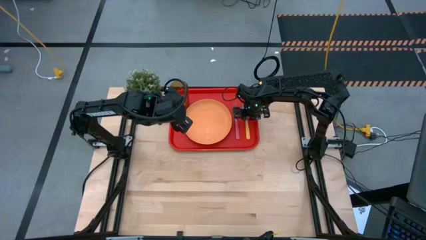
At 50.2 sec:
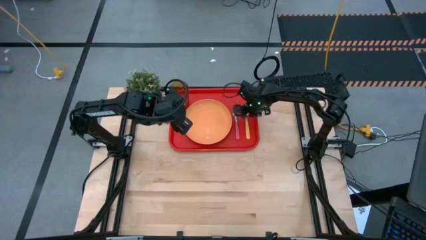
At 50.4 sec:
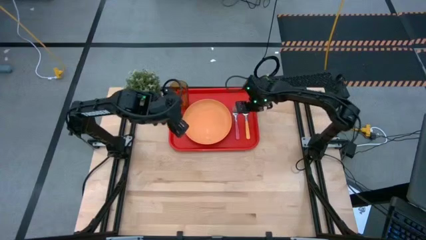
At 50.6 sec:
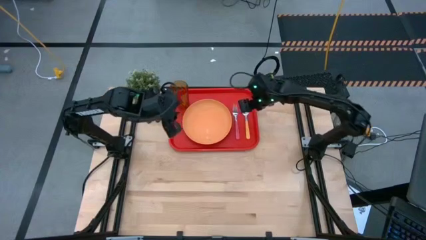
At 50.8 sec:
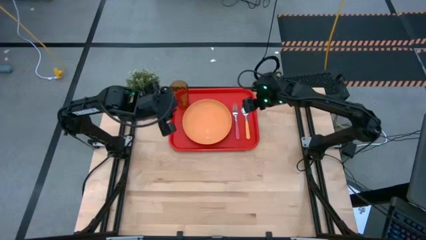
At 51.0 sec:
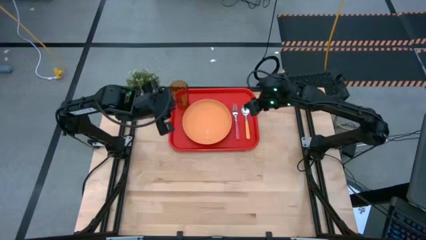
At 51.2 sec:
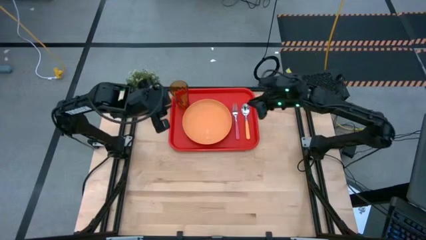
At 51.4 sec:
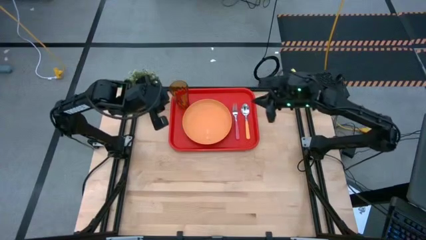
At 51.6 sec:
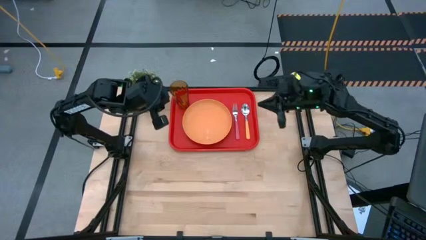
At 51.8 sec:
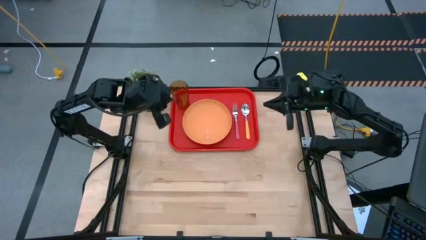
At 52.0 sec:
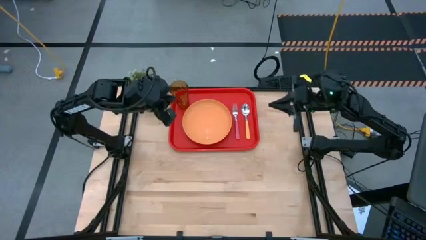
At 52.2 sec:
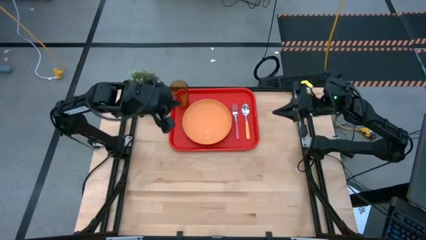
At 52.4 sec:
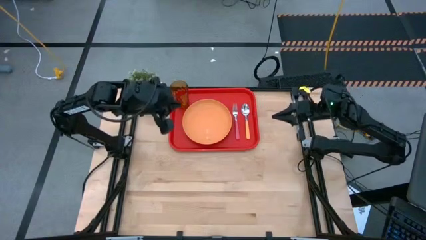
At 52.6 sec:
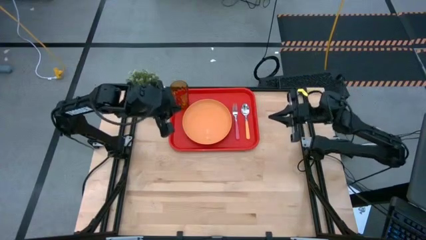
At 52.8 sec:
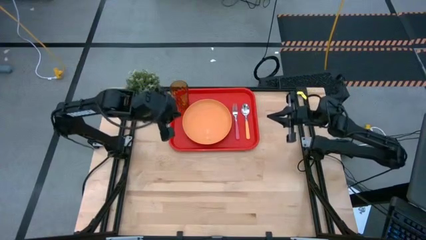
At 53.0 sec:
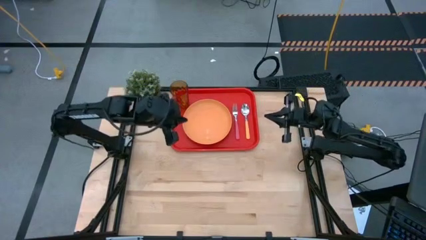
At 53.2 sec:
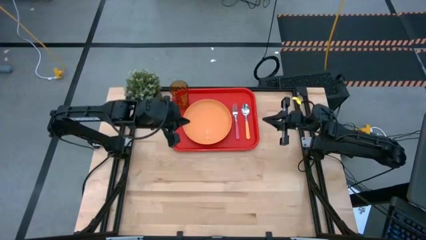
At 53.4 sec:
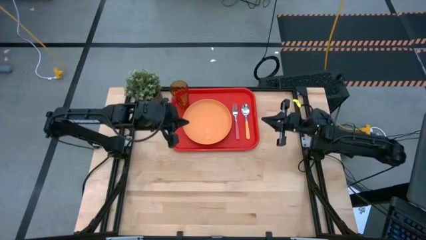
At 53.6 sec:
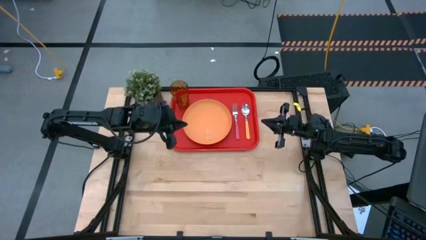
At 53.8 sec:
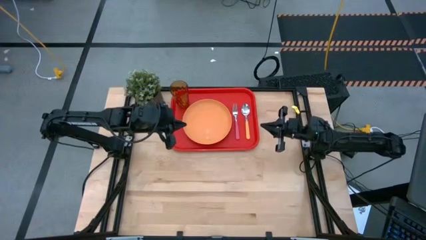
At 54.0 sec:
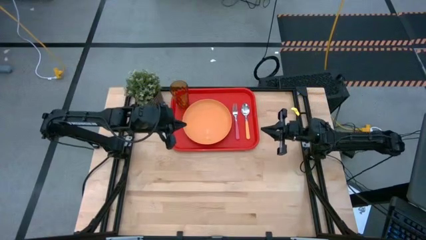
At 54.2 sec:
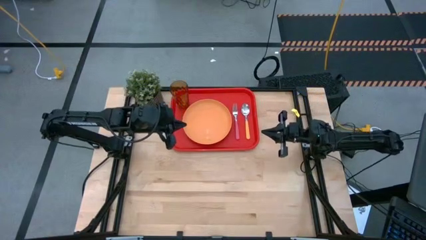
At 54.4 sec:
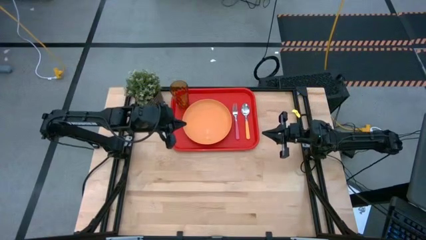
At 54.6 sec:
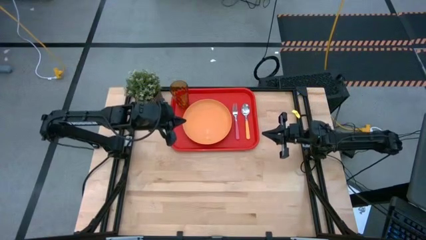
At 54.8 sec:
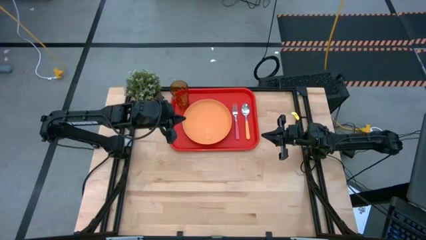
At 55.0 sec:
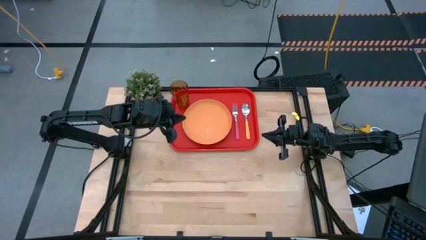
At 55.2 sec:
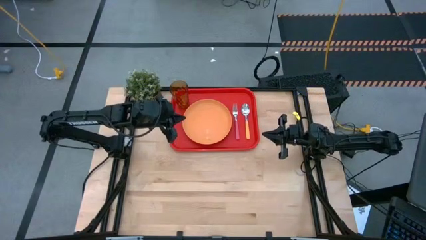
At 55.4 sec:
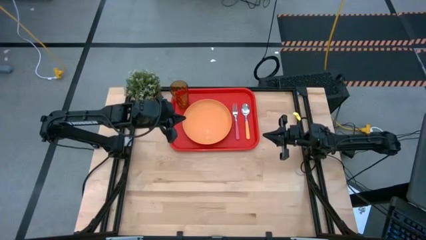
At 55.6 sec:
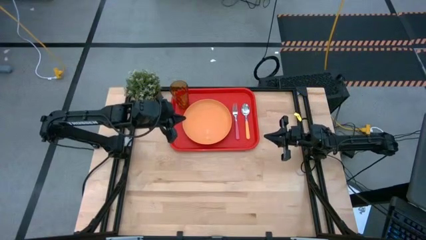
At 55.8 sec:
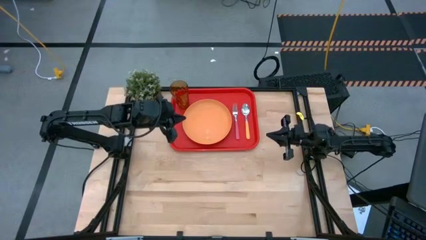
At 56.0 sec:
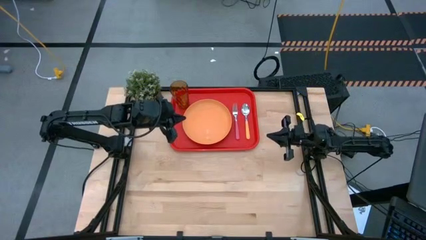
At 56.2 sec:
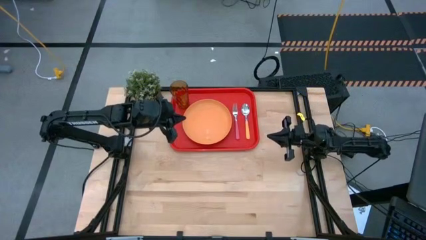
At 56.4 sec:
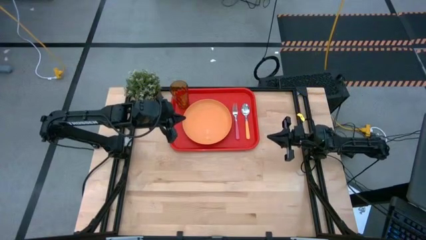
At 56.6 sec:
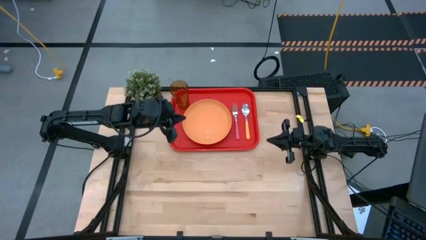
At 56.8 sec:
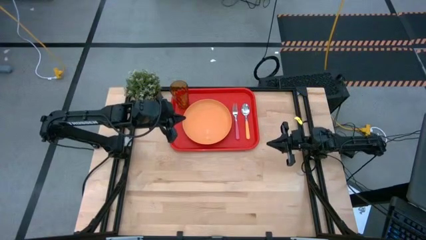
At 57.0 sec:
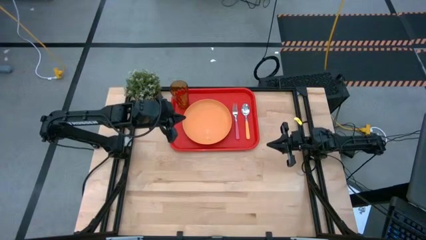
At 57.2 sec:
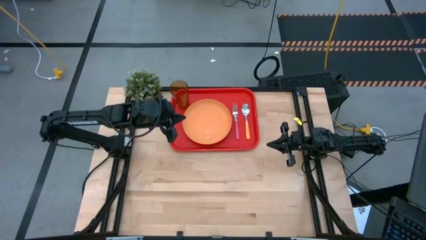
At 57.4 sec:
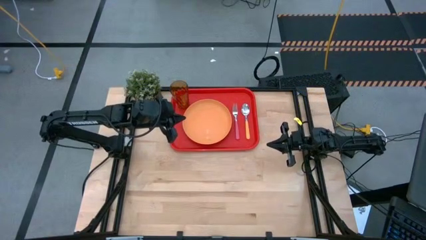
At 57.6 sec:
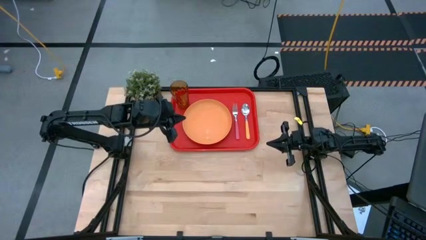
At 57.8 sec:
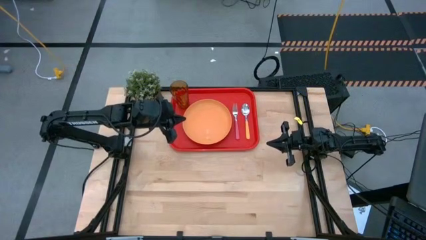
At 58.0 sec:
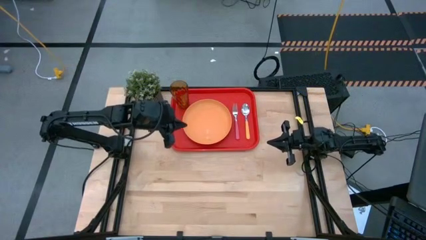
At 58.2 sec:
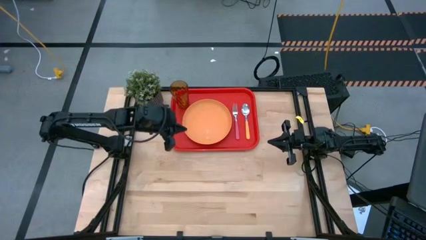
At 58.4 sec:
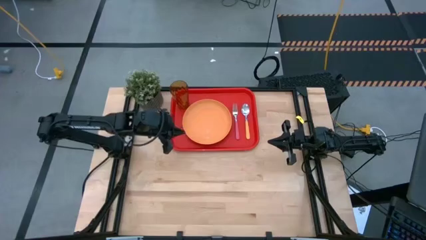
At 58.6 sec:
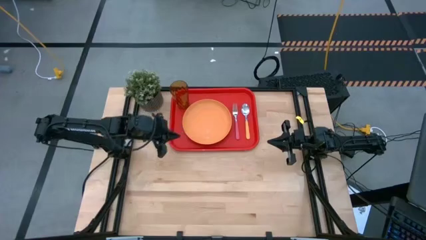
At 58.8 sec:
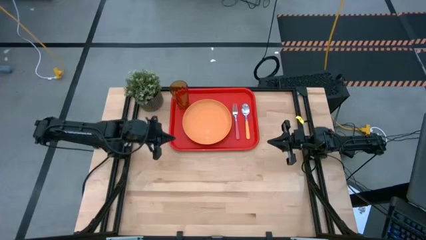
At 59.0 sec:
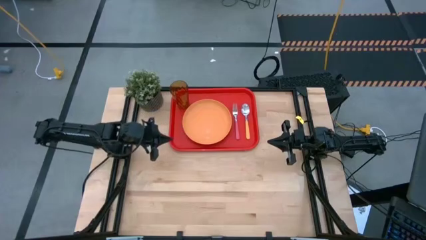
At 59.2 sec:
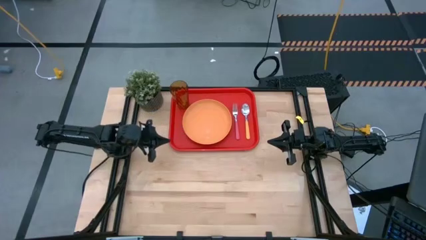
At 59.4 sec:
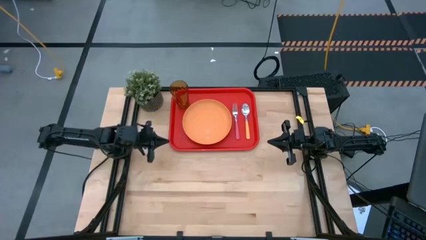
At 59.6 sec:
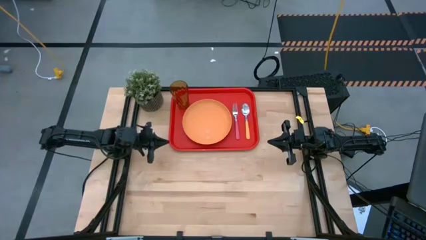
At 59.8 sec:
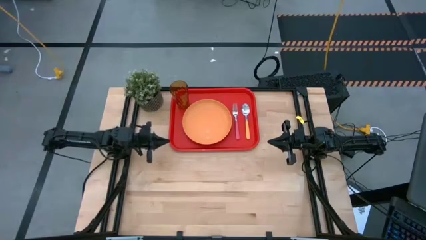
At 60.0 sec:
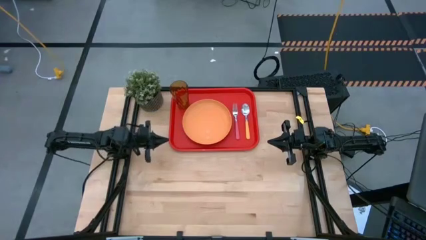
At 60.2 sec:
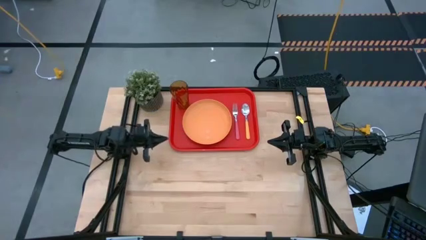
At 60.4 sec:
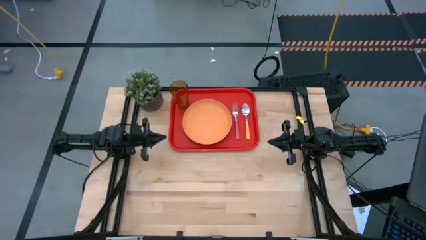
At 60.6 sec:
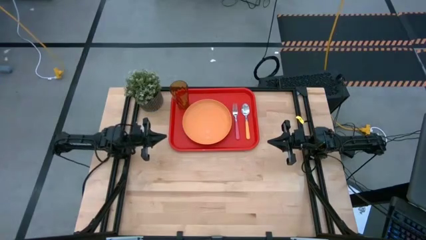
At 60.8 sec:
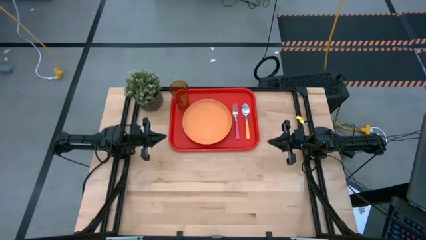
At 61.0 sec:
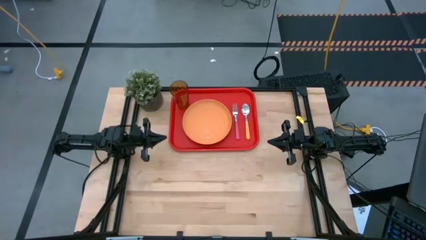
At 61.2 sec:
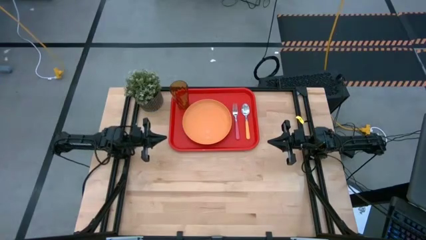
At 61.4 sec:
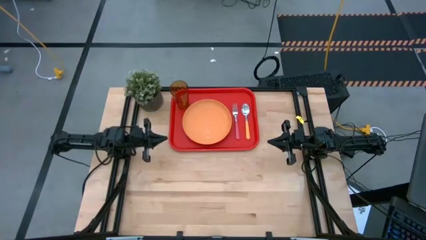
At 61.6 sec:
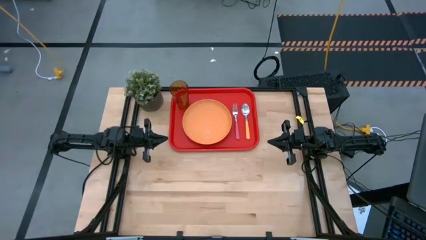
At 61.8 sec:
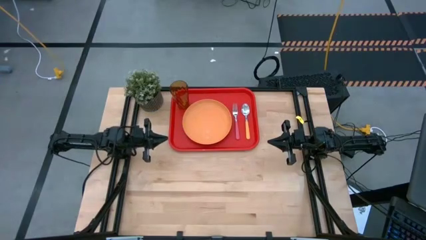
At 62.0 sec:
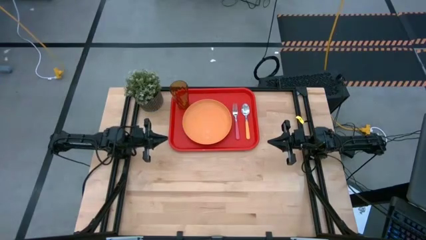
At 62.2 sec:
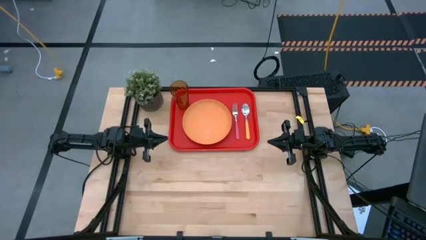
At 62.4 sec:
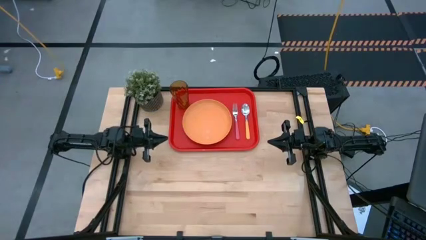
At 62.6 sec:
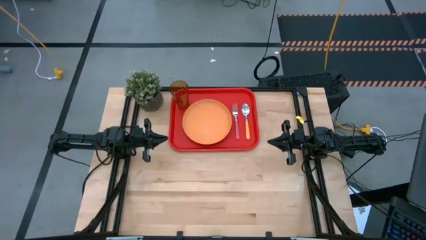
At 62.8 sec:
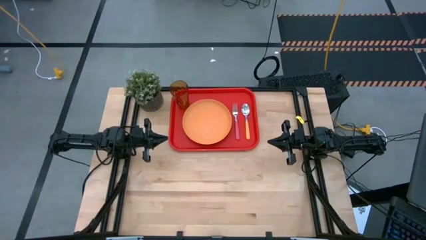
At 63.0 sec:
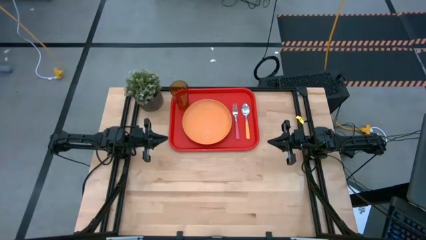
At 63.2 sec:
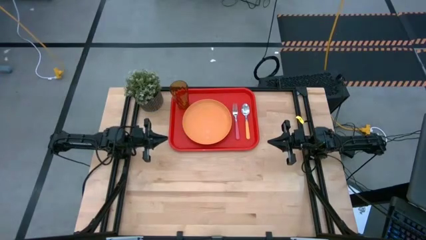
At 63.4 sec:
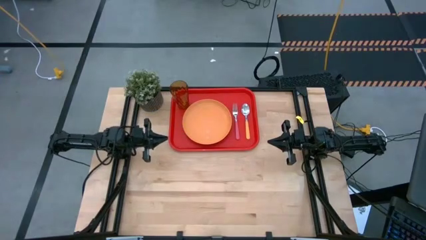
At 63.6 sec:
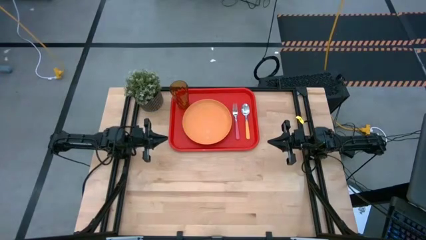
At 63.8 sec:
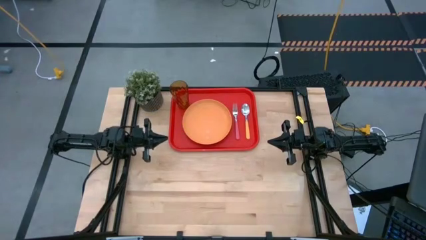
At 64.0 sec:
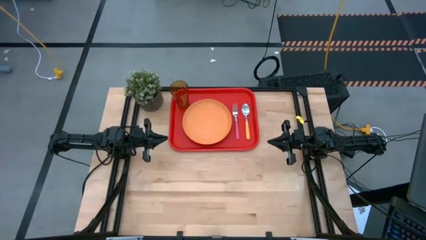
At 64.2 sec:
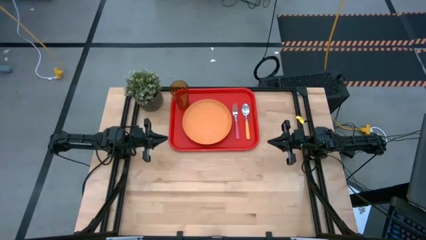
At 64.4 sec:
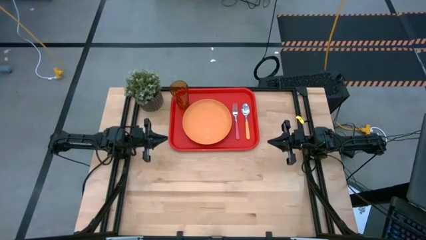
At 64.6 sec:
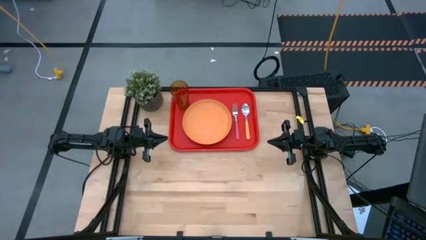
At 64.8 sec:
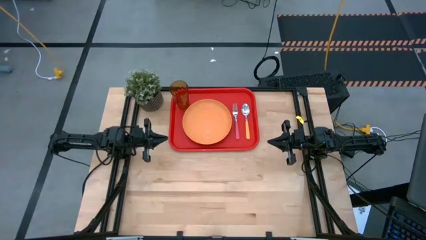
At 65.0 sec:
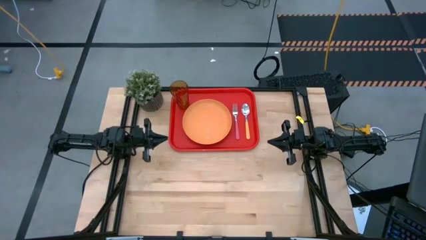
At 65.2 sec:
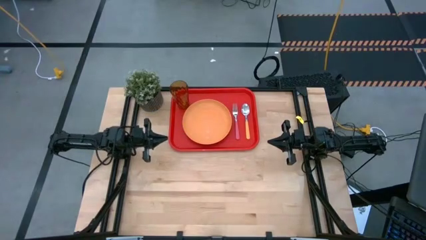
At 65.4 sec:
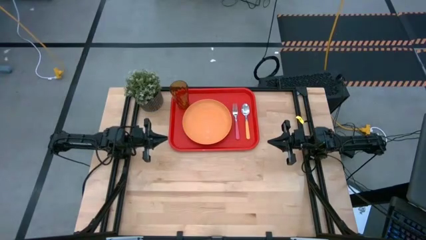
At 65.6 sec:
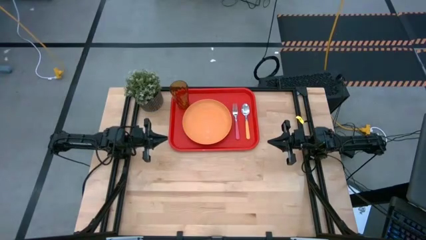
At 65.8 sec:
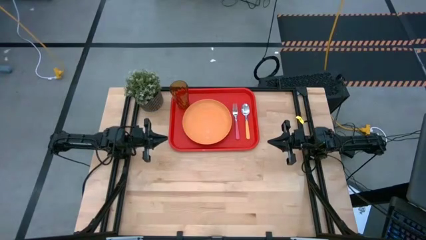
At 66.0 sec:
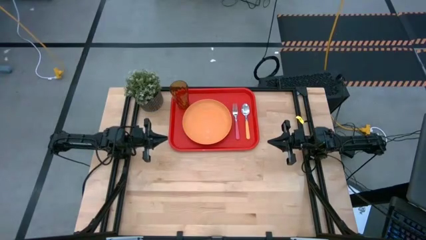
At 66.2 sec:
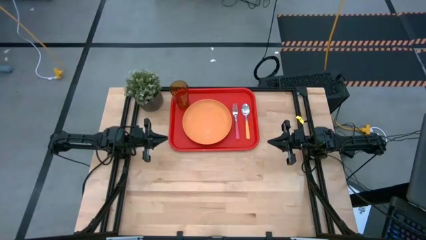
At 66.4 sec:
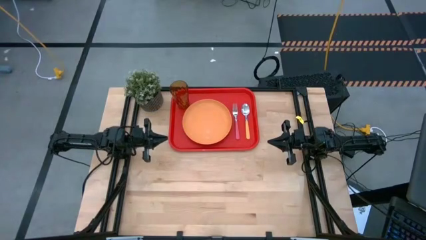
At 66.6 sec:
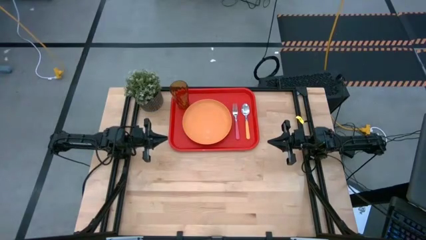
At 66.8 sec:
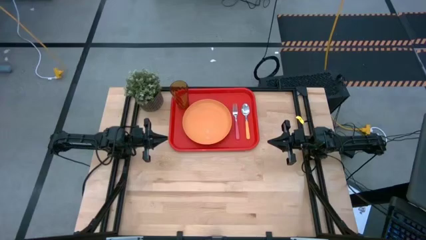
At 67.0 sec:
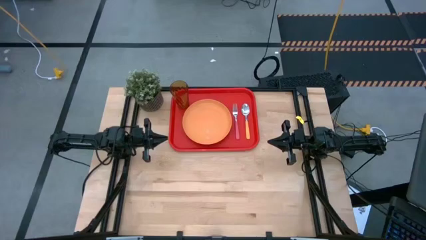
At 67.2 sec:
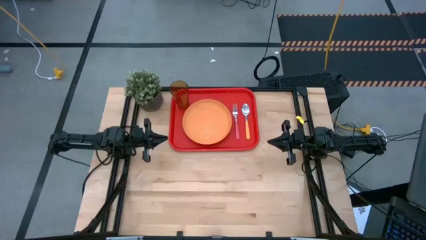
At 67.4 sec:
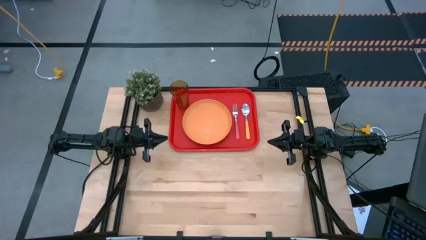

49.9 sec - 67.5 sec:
Task: Pick and place plate/cup/fork/spoon on tray
Return to Home Position
